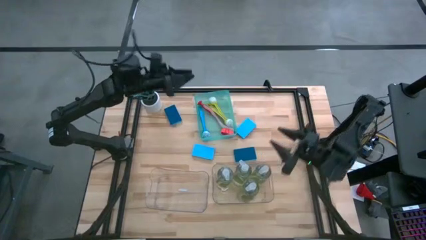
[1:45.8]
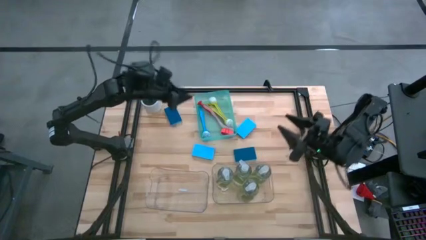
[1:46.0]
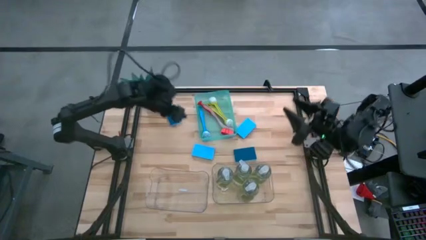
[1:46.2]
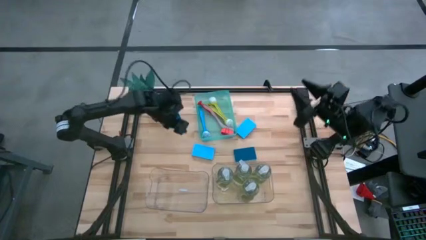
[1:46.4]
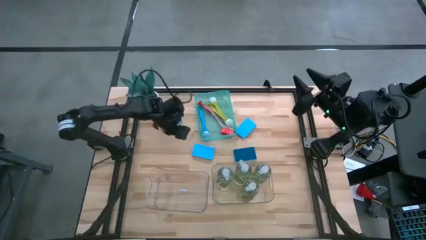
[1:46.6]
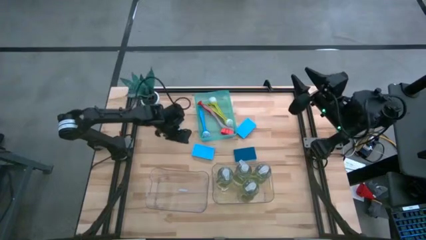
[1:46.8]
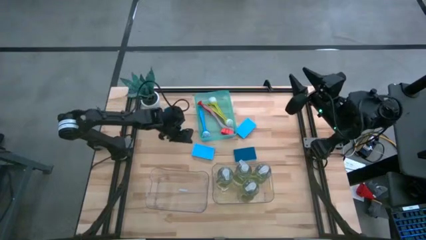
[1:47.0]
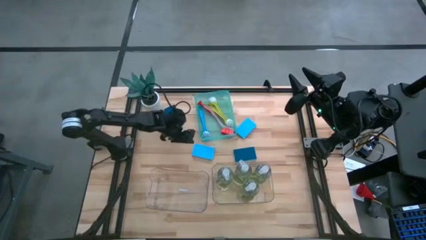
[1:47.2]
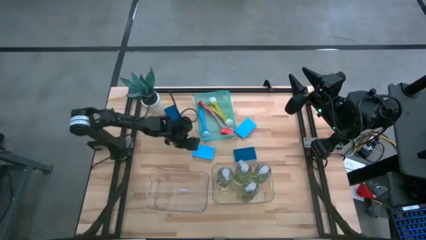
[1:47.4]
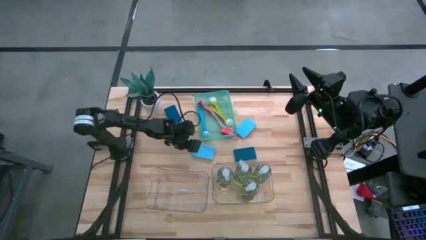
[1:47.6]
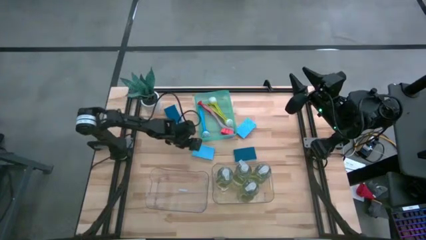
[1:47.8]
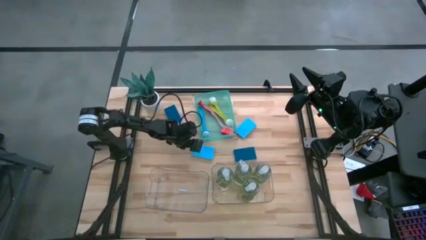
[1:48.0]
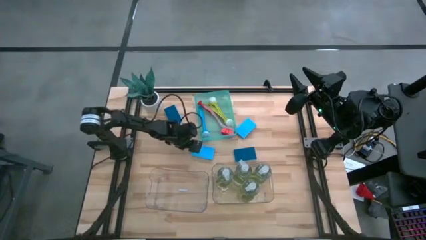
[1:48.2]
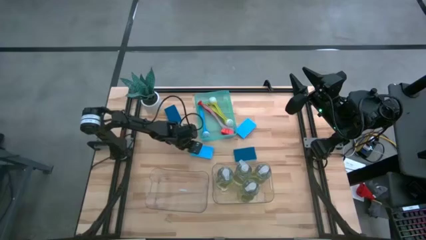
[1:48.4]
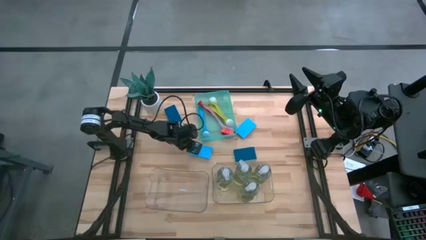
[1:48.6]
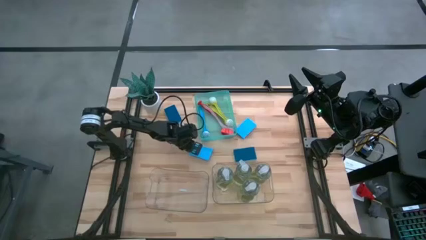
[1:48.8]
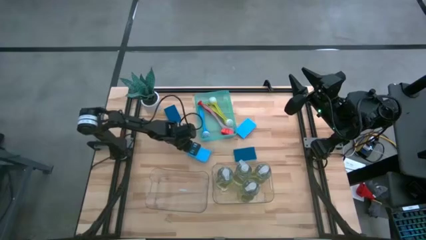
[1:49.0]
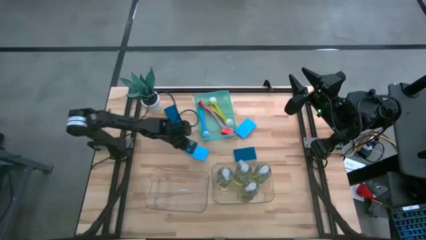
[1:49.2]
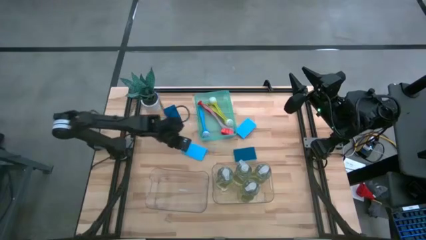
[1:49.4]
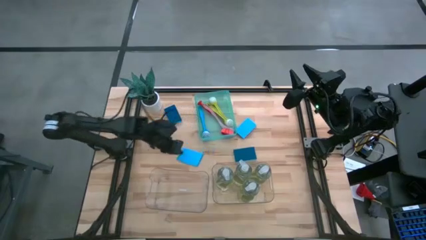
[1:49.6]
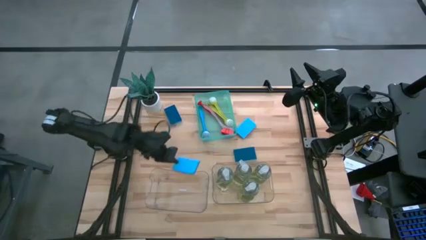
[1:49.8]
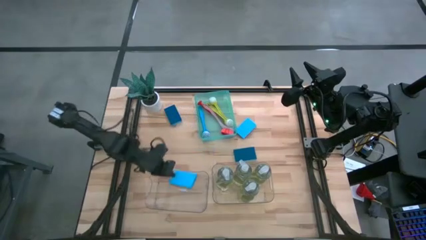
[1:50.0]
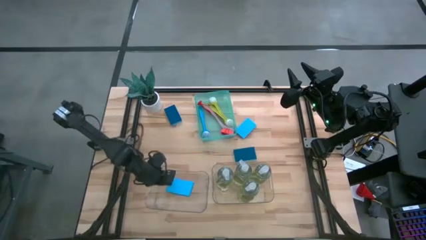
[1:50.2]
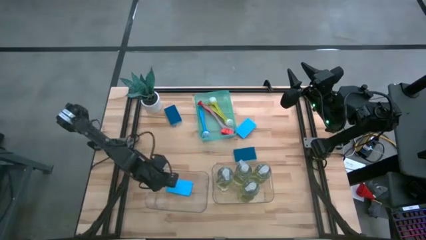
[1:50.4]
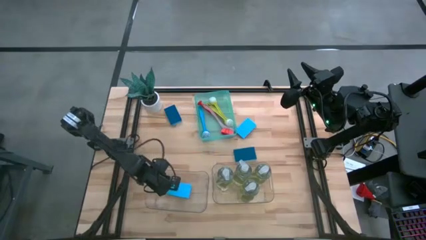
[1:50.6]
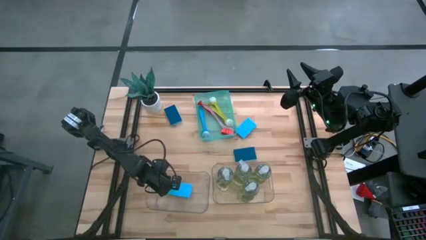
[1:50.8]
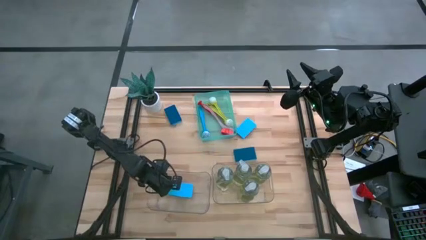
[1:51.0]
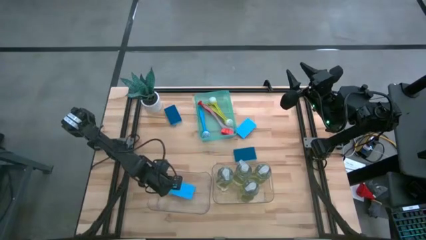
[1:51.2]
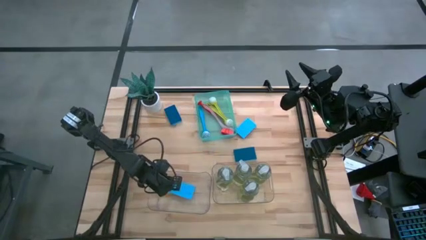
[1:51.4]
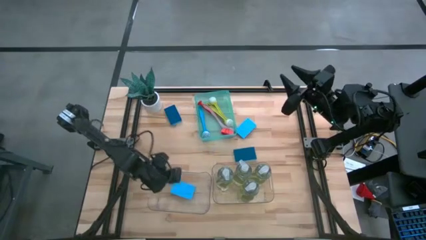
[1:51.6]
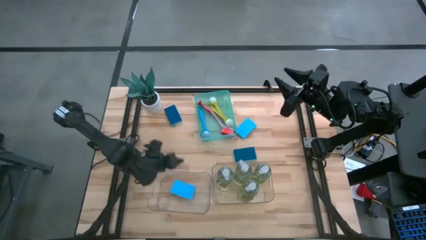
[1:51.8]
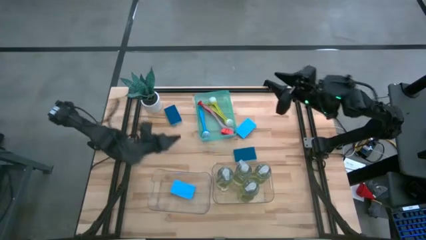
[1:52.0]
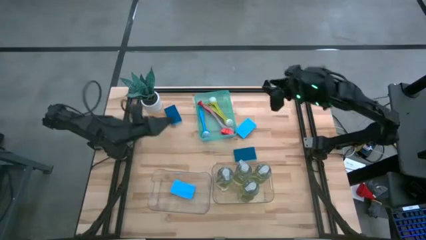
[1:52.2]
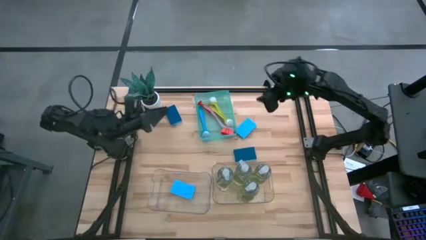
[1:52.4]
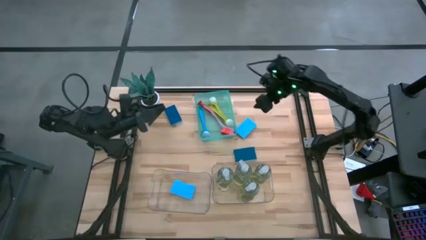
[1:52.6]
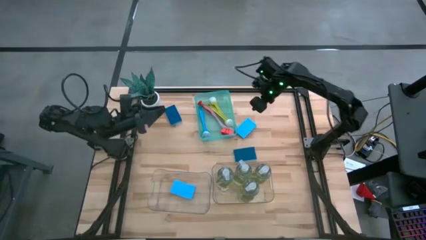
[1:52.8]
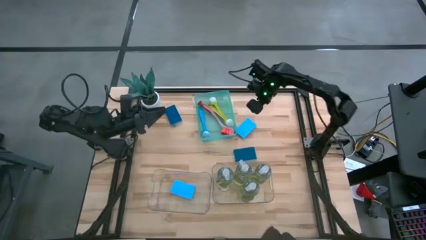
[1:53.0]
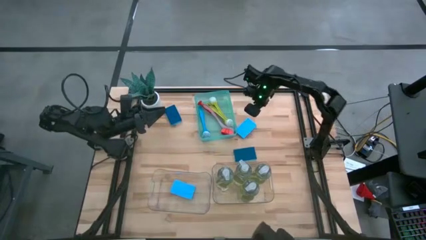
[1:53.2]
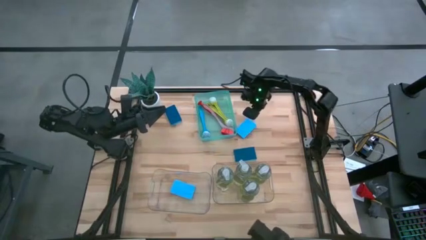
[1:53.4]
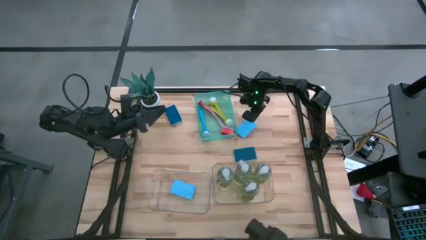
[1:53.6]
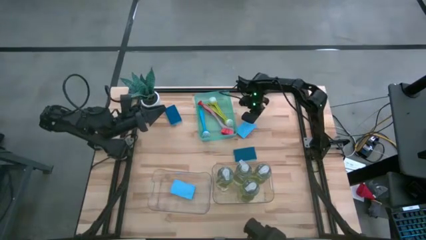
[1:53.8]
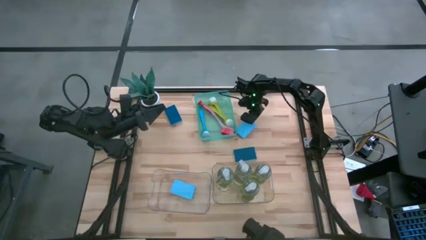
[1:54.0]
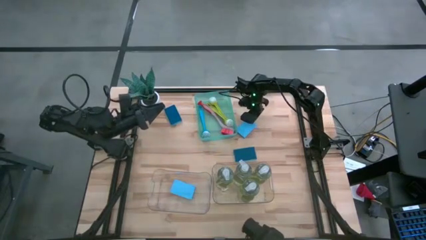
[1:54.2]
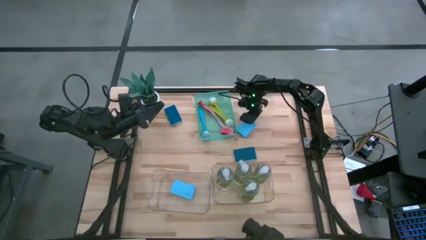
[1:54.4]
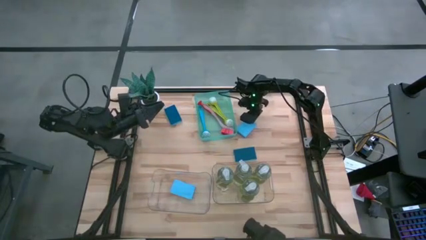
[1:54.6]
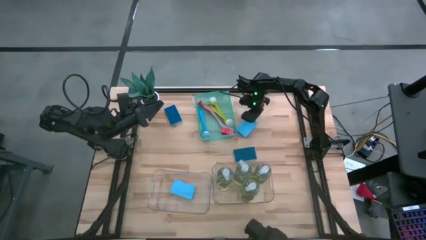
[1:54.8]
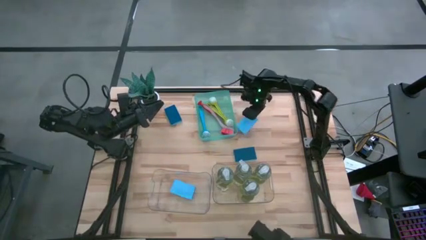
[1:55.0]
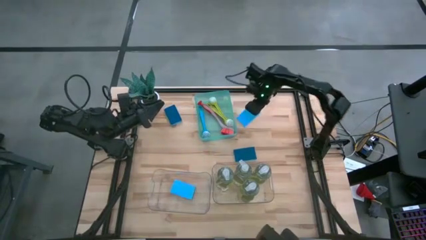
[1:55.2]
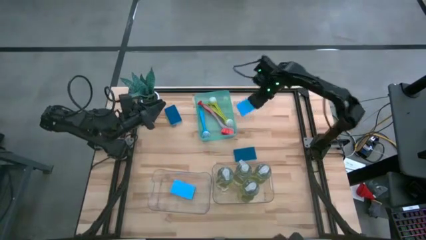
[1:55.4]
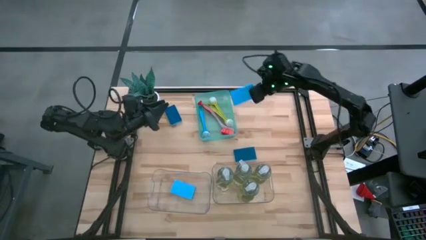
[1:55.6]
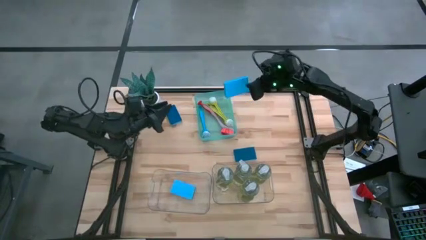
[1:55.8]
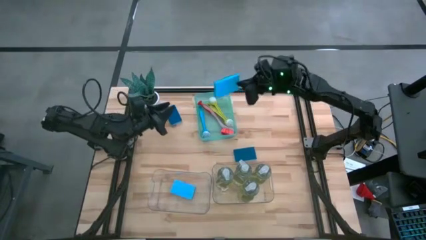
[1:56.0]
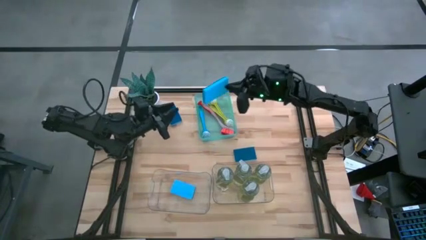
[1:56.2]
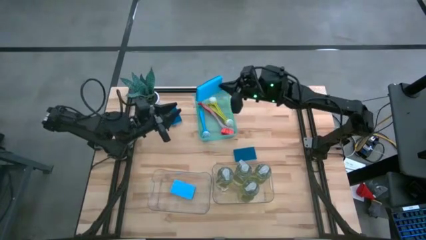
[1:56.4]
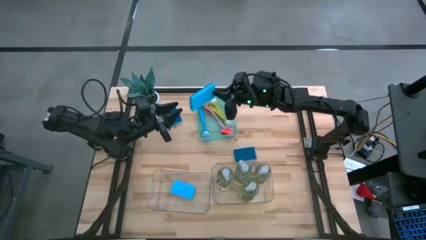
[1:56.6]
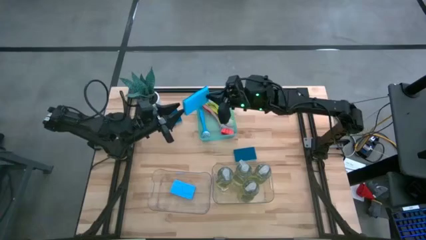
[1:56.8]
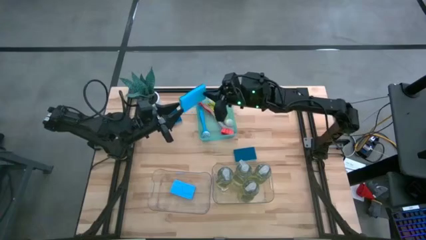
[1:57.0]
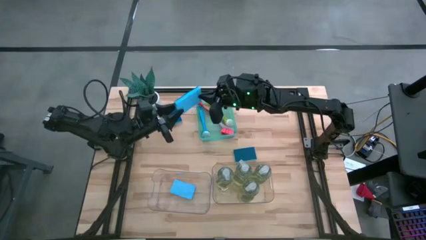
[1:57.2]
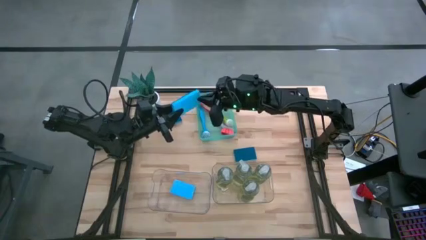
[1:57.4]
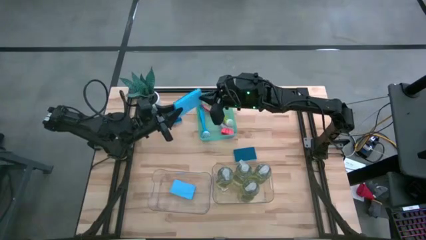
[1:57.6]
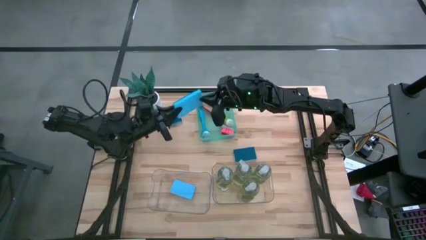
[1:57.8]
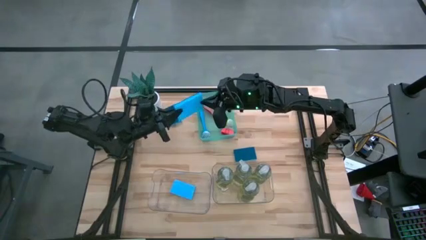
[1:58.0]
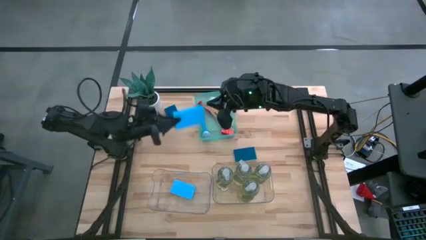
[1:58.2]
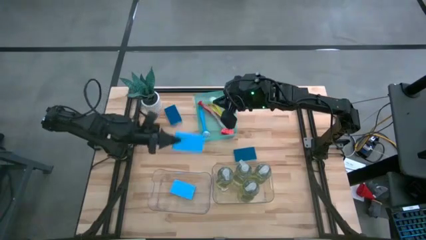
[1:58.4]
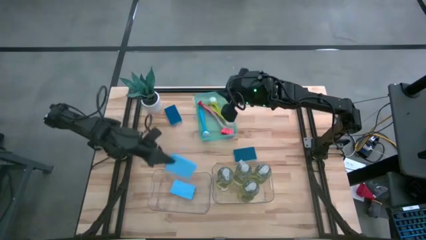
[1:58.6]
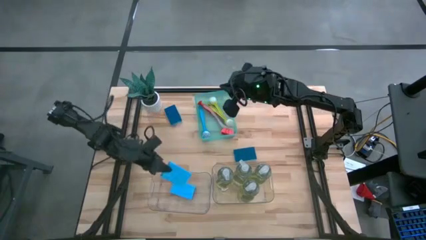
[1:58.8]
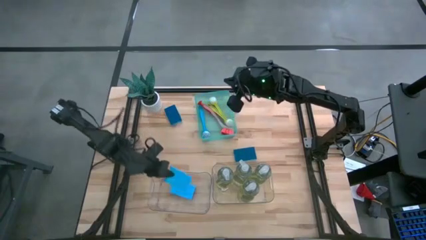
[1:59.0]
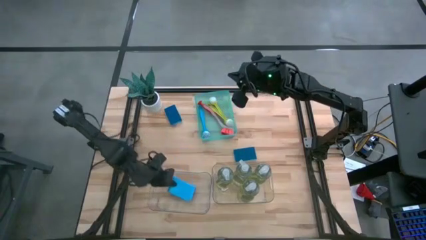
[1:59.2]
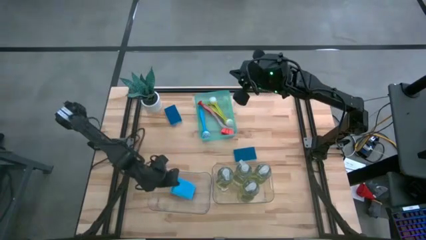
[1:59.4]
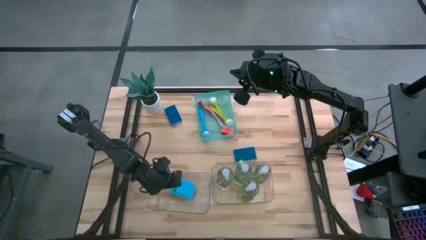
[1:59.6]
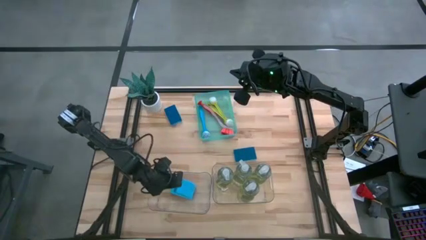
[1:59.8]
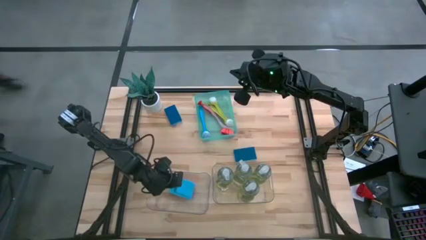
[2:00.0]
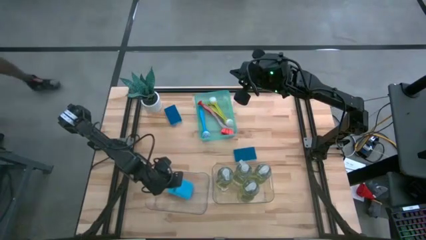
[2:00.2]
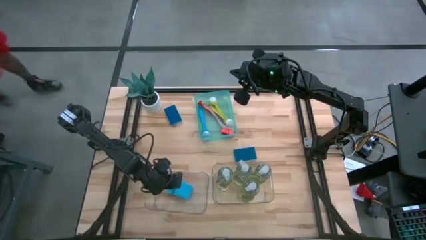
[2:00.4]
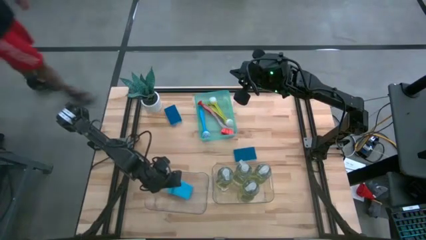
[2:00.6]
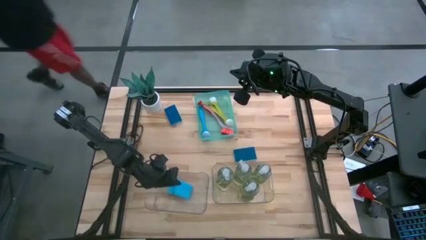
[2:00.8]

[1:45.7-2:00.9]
Task: Pick & Place Kitchen Sink Supplies
Put the blue sponge into the left transparent bin

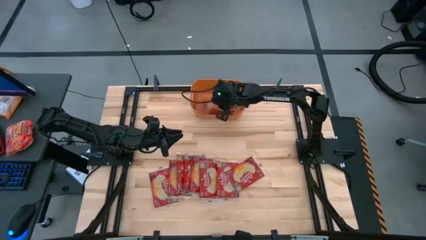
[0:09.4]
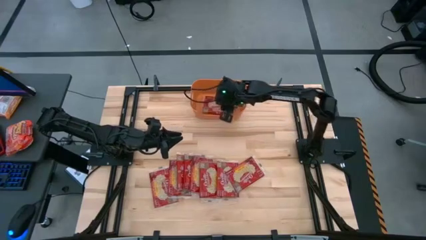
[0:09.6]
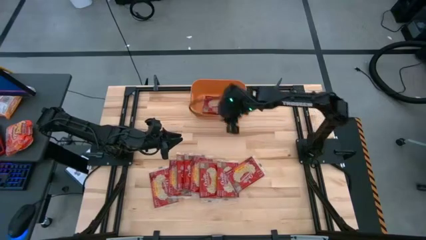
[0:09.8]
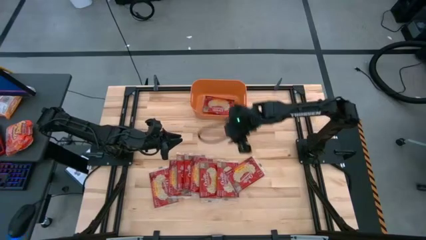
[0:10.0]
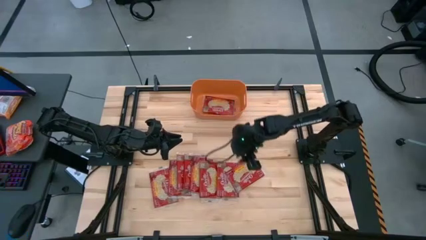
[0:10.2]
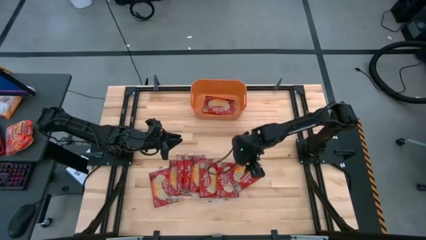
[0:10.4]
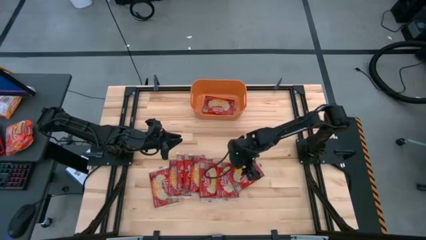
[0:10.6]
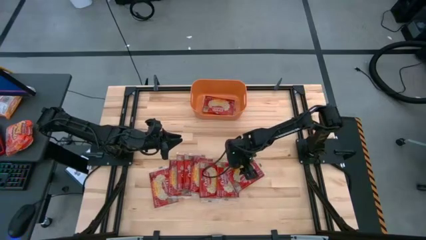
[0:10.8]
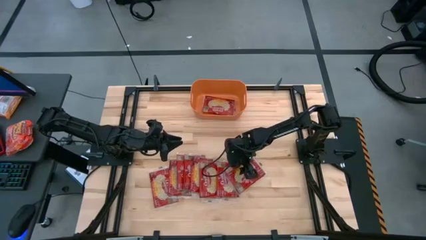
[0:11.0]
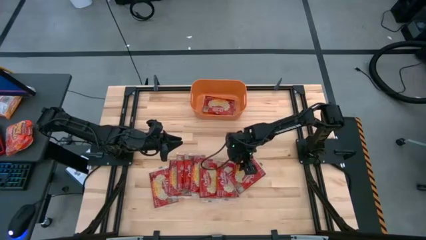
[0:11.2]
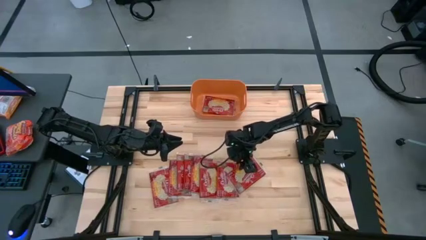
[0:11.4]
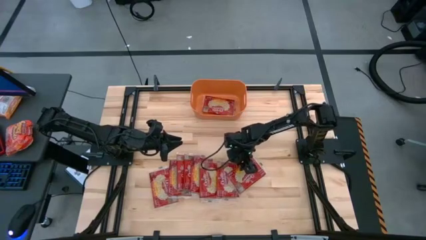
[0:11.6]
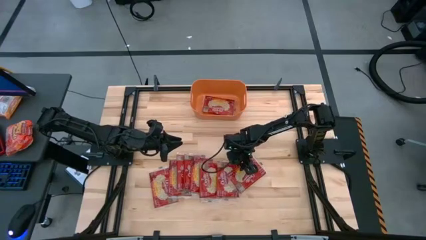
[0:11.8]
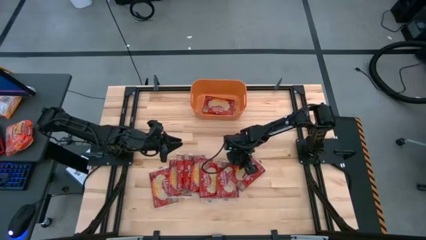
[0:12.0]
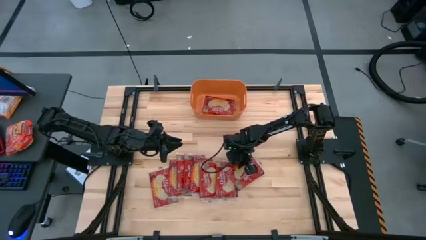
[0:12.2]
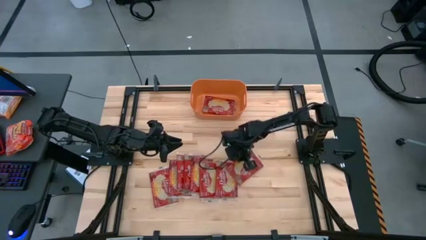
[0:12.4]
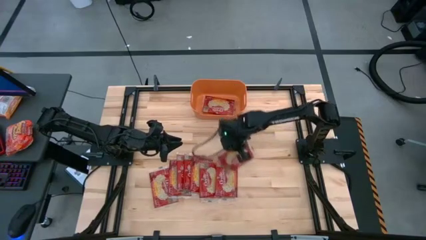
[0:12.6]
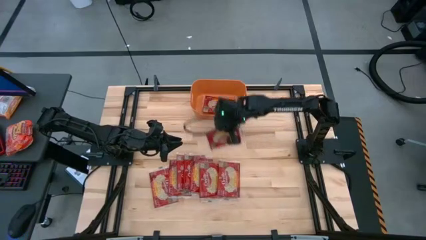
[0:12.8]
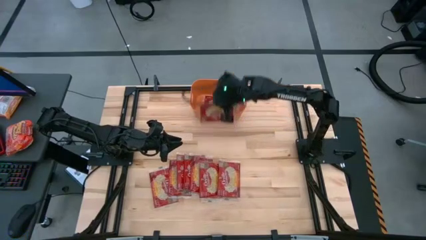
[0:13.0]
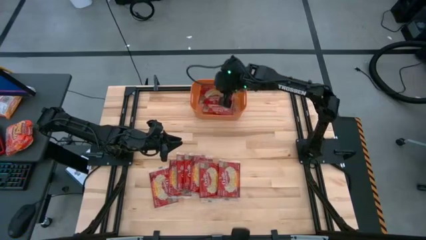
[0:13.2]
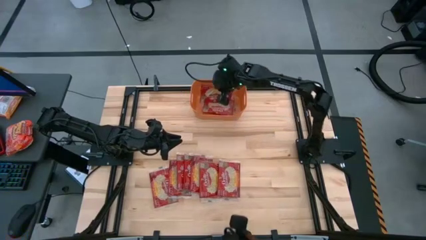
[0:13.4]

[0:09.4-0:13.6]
Task: Sort popcorn bags into baskets
Put the red popcorn bag into the orange bin
